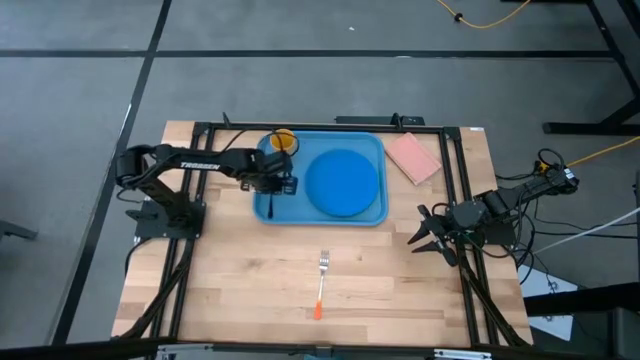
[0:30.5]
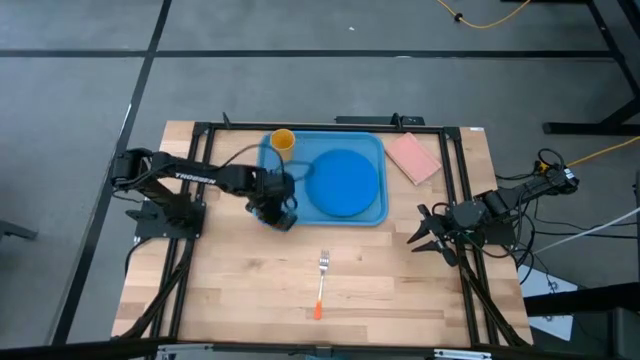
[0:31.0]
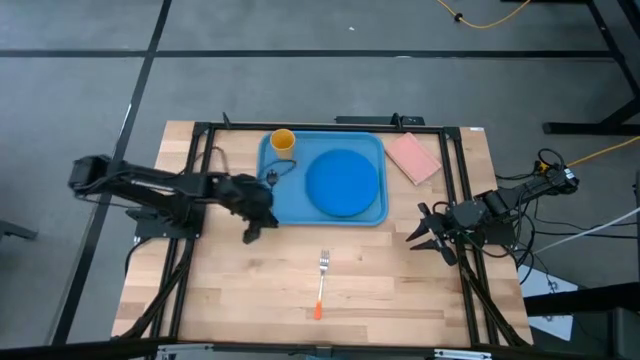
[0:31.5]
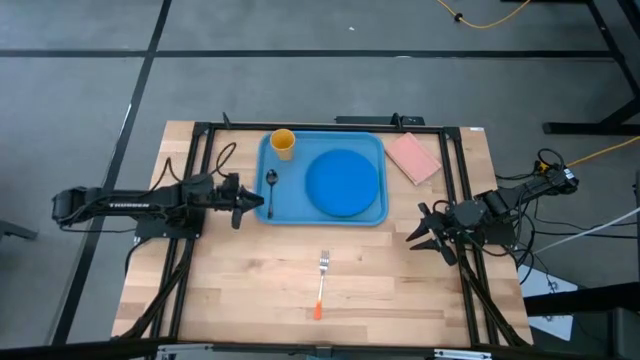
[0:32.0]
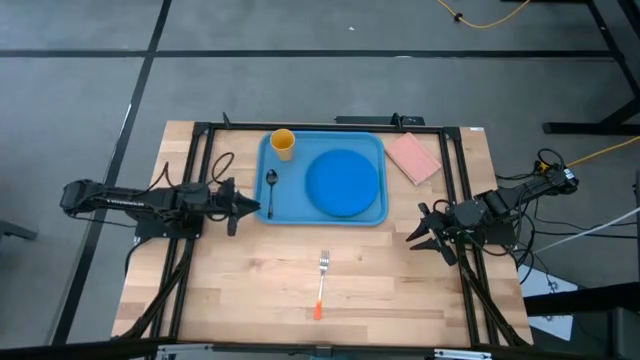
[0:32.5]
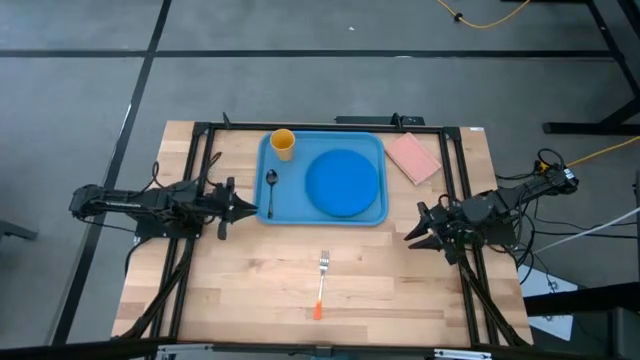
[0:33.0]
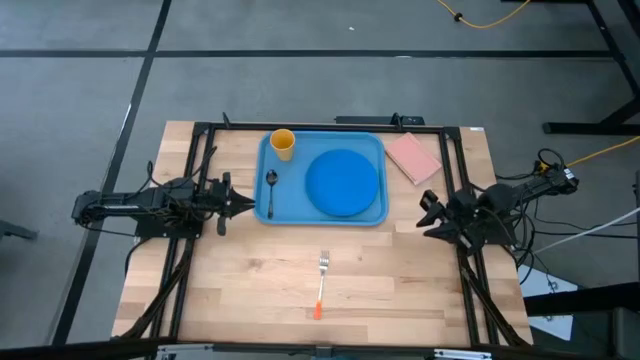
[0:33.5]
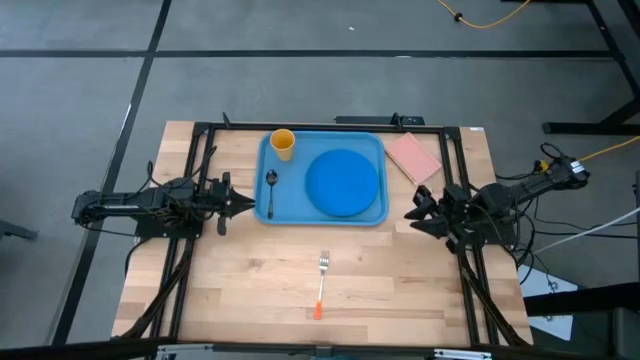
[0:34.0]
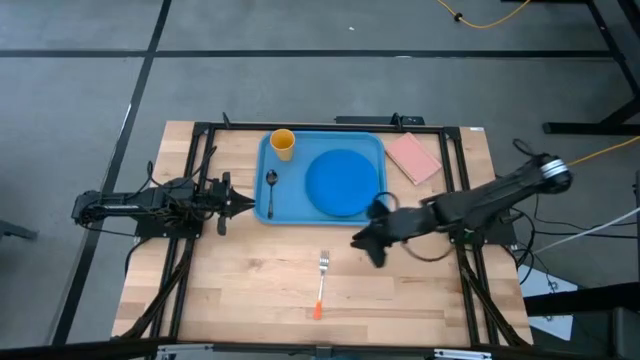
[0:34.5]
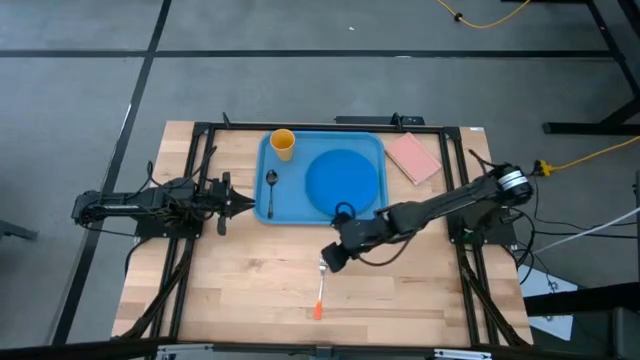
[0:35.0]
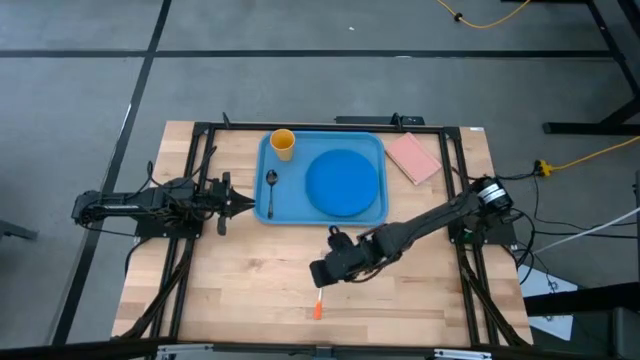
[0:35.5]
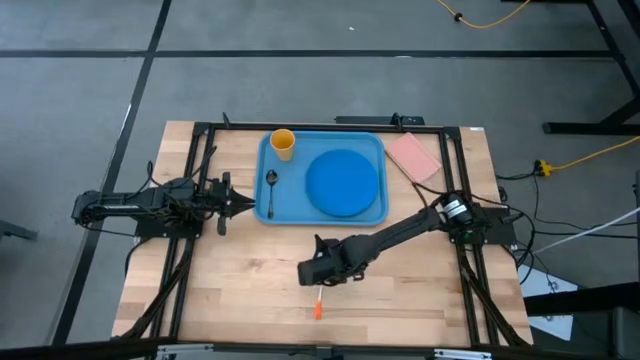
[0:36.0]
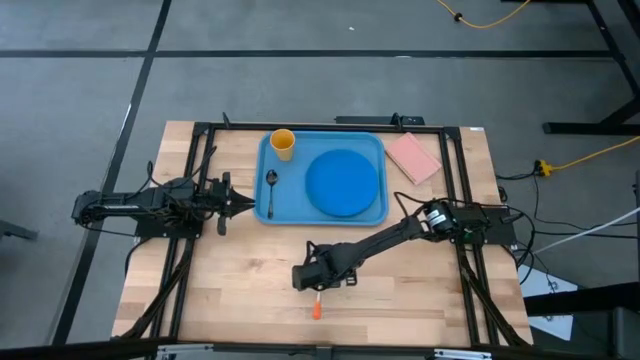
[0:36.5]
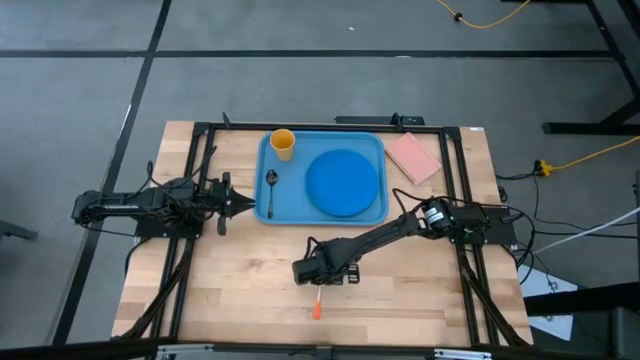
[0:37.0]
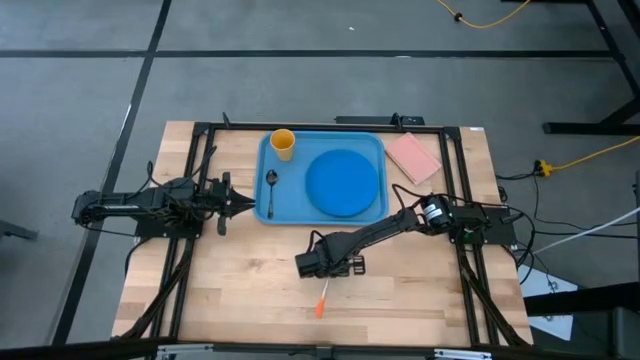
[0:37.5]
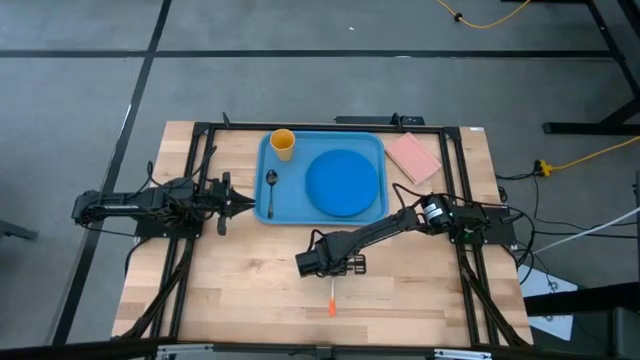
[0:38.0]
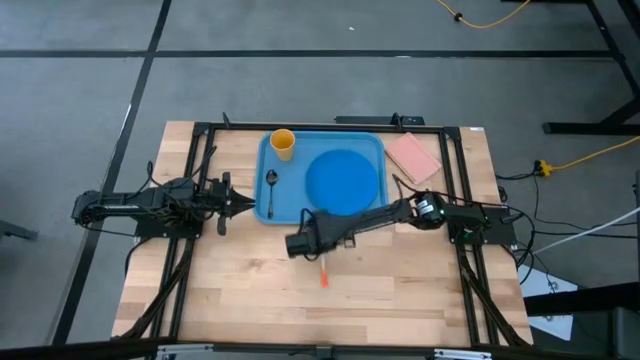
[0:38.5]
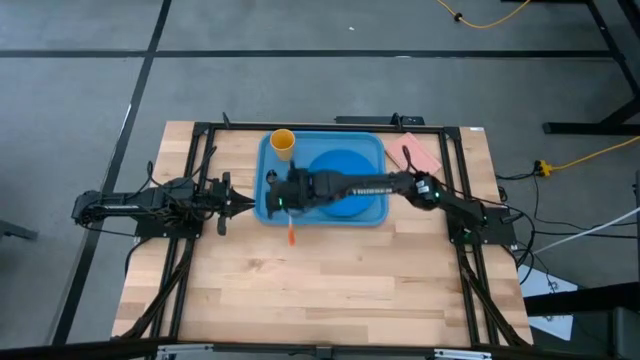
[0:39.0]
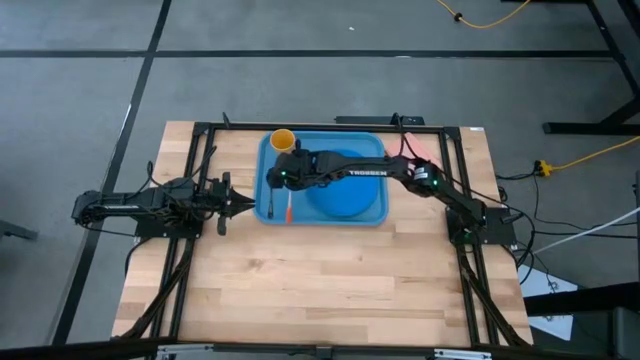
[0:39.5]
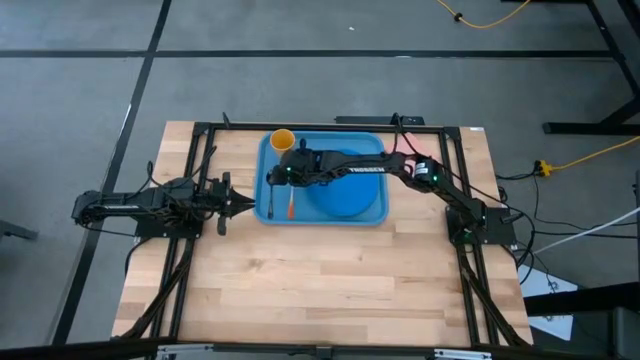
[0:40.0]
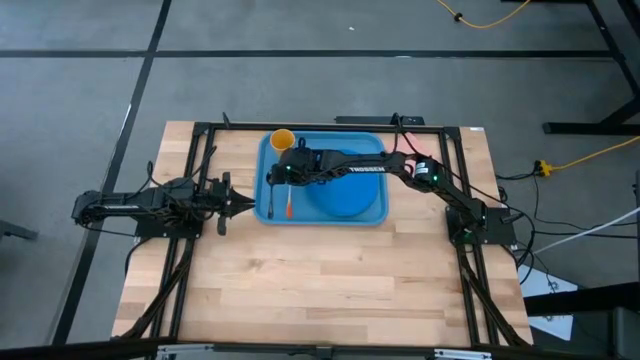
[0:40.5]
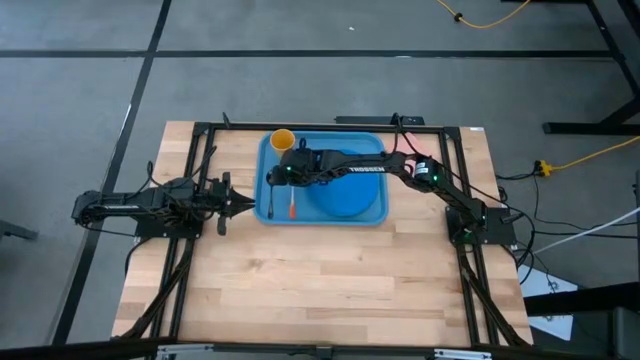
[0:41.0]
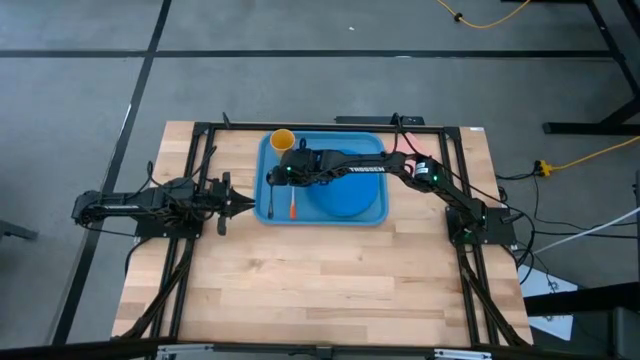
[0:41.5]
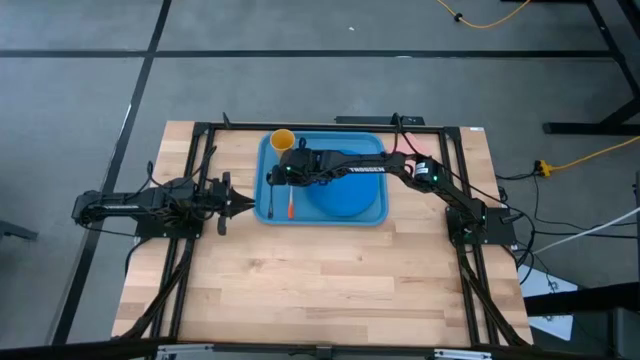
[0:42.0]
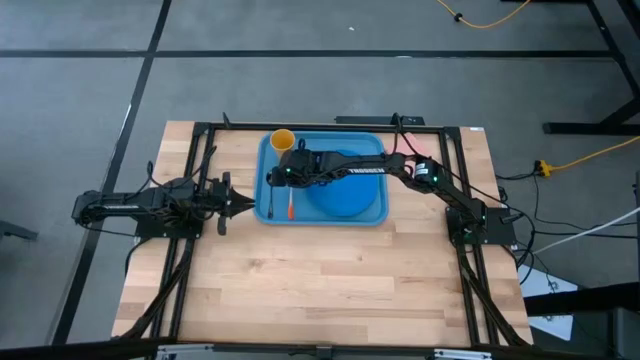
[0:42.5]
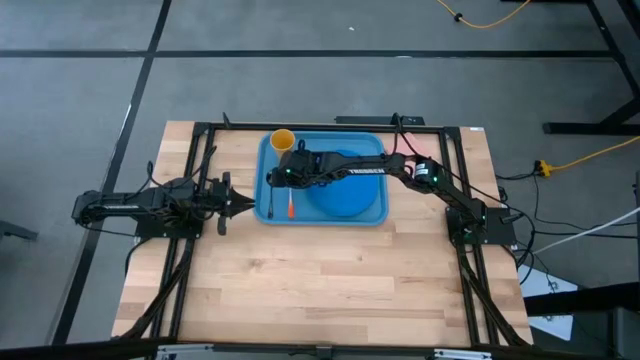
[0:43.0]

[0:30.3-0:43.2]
Task: Pick and place plate/cup/fork/spoon on tray
Put the orange fork on the blue tray to the right of the blue plate

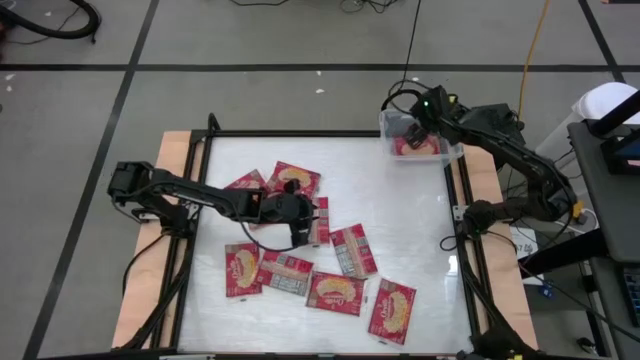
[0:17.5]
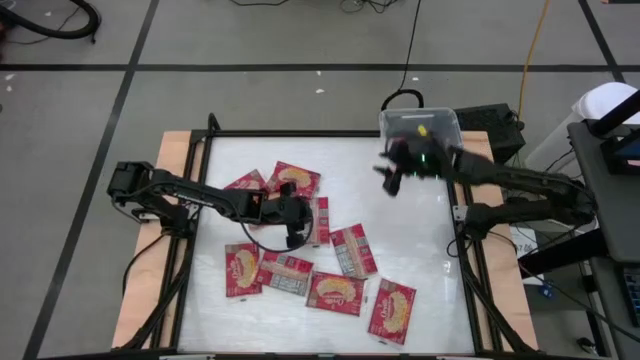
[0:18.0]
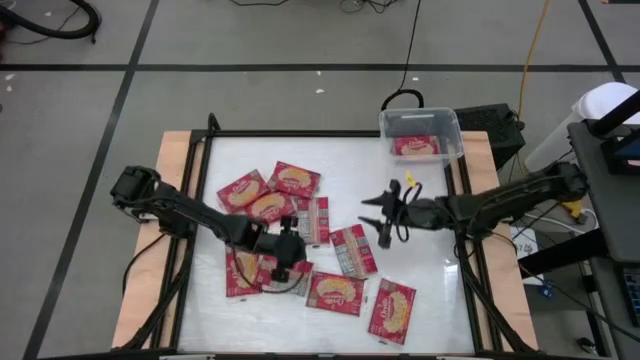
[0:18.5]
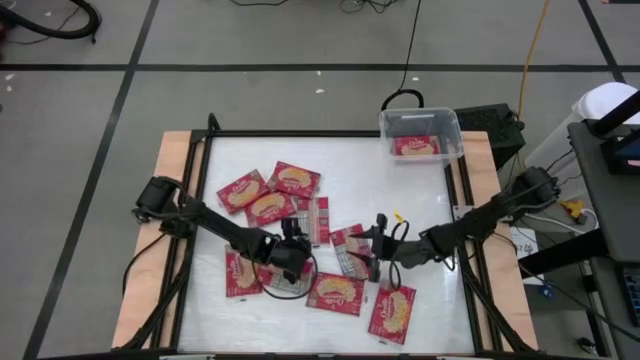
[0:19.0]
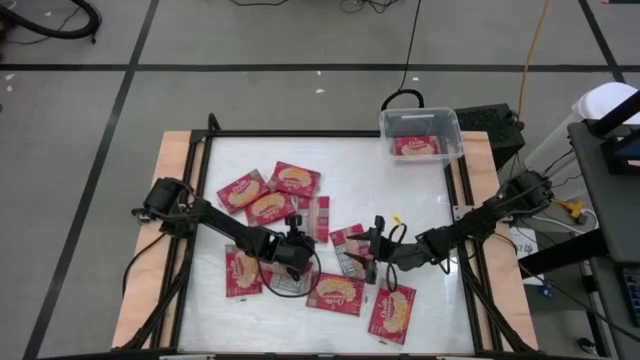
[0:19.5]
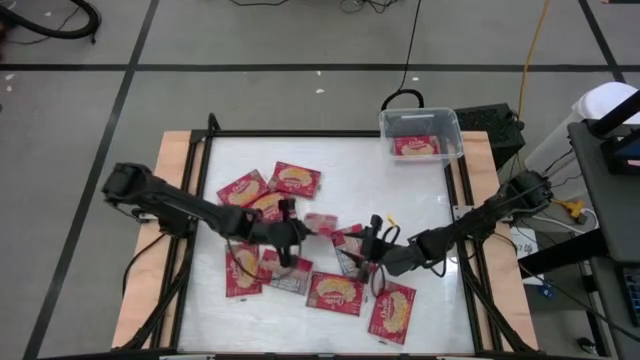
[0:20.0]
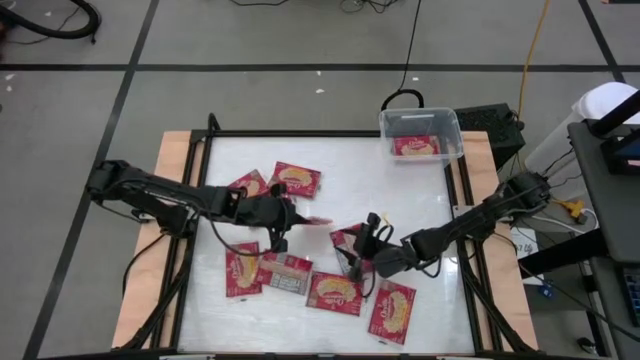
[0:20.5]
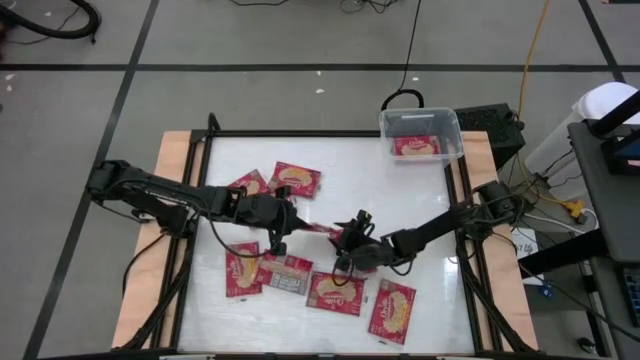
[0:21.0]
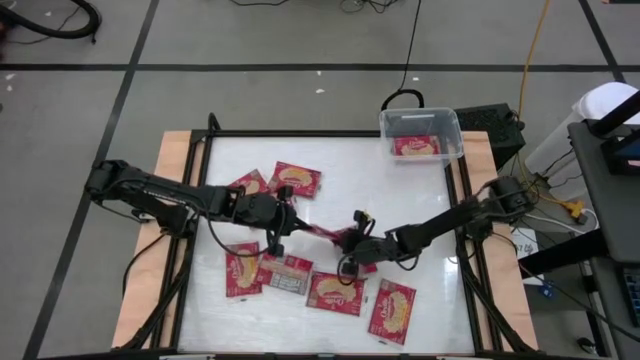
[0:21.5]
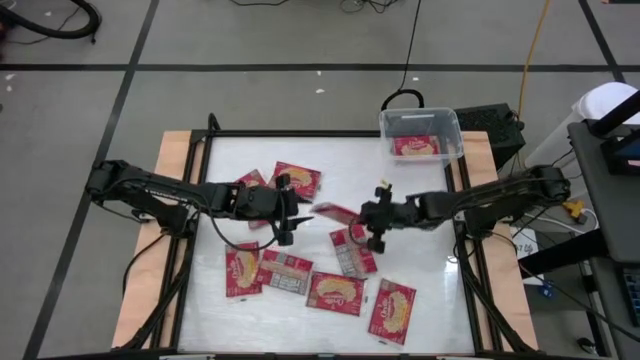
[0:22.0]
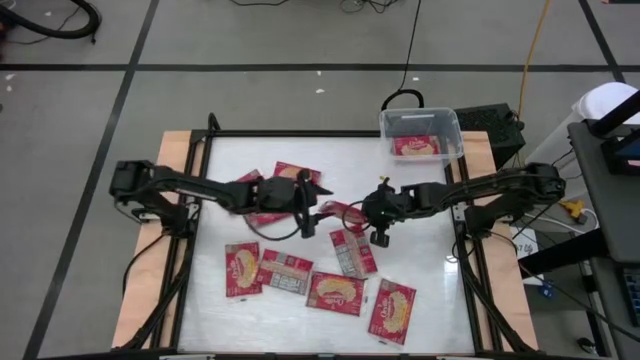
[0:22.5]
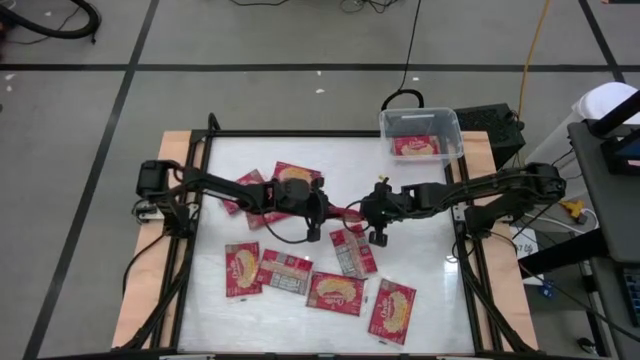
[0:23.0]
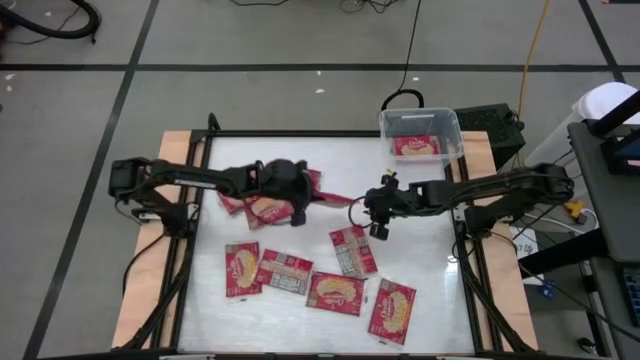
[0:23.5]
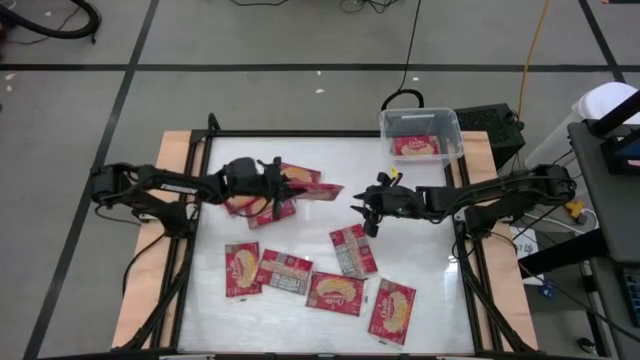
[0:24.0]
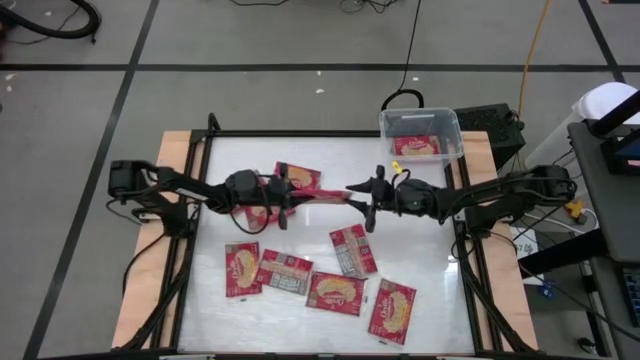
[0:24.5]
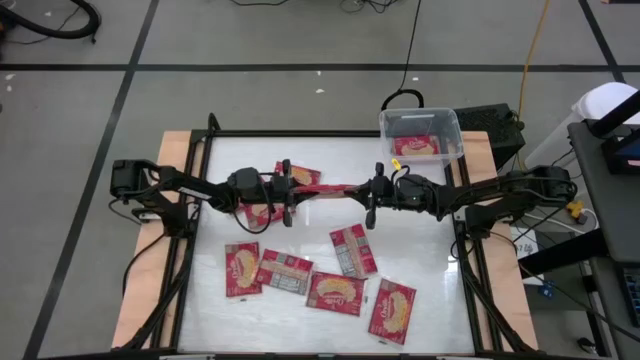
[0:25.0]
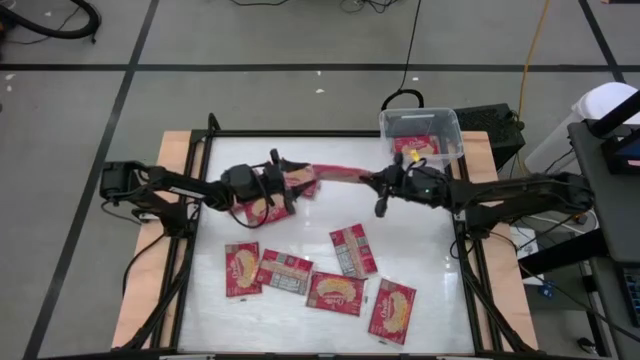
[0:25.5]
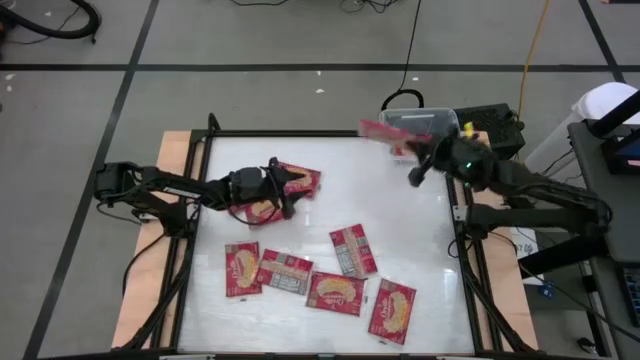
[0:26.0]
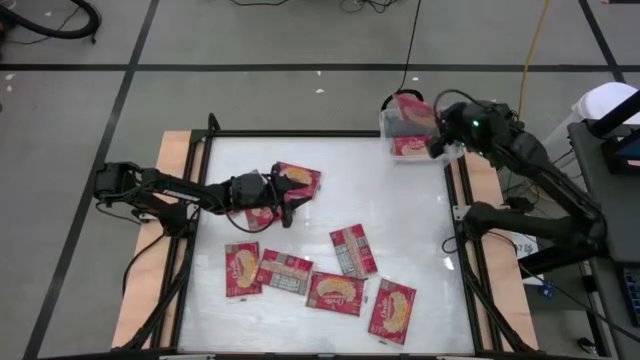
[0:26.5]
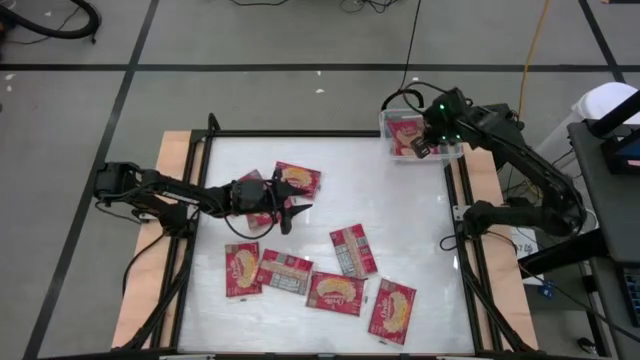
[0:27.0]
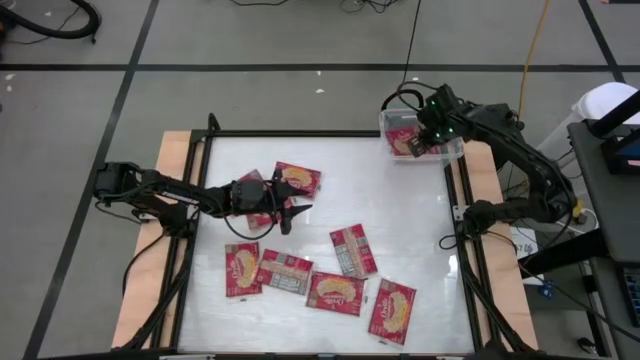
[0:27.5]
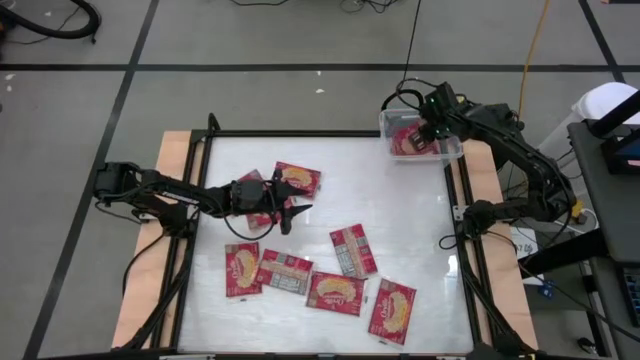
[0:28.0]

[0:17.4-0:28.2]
Task: Sort popcorn bags into baskets
Put the red popcorn bag into the transparent bin
